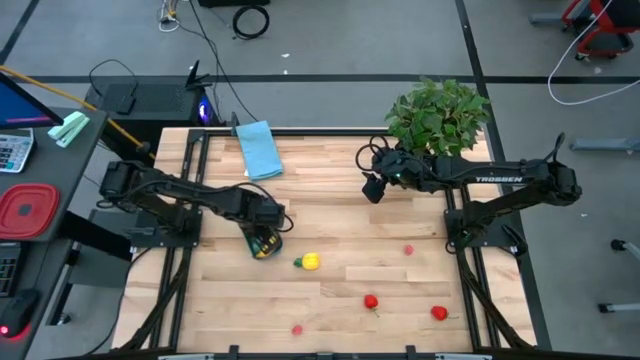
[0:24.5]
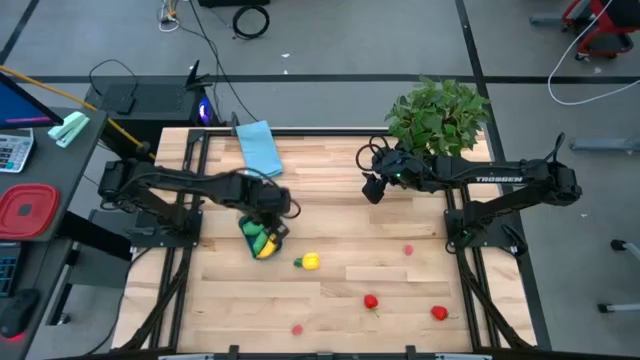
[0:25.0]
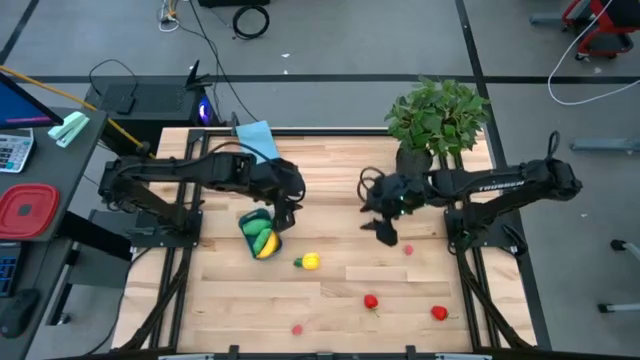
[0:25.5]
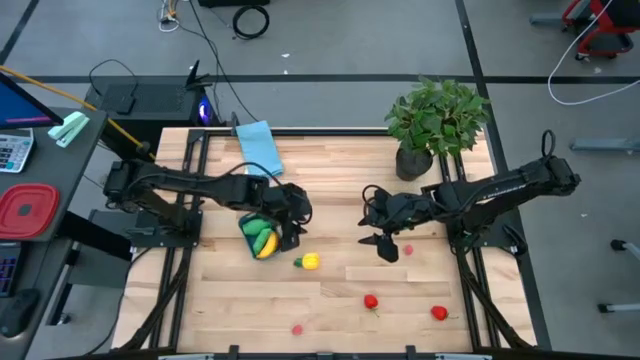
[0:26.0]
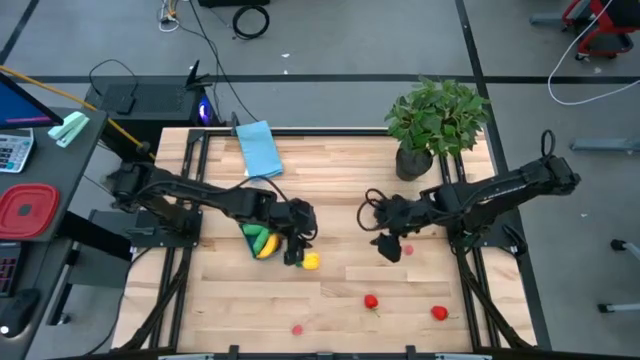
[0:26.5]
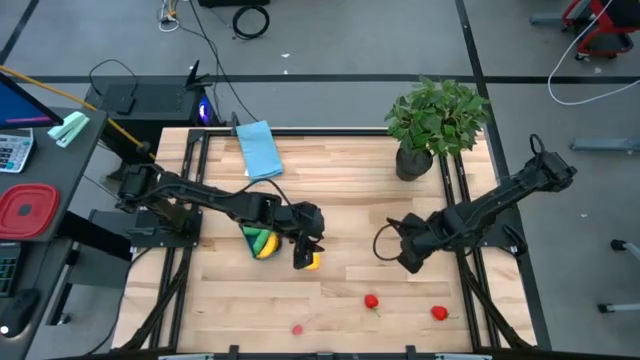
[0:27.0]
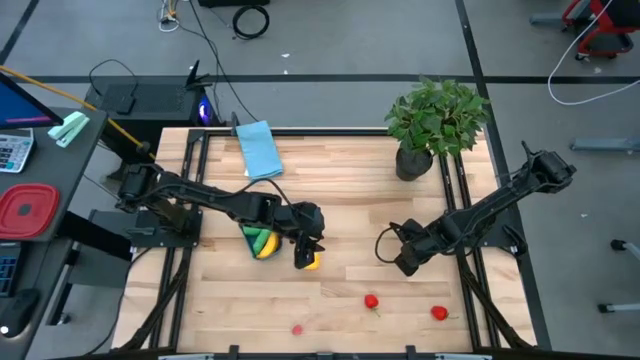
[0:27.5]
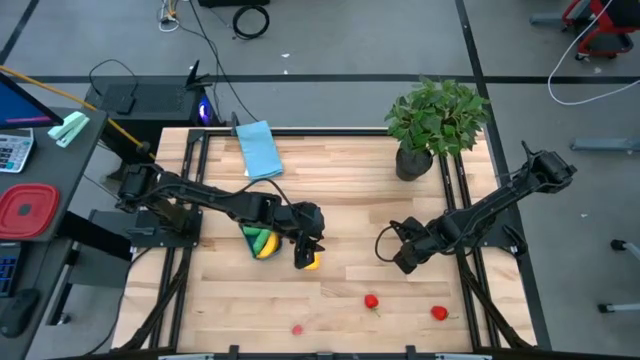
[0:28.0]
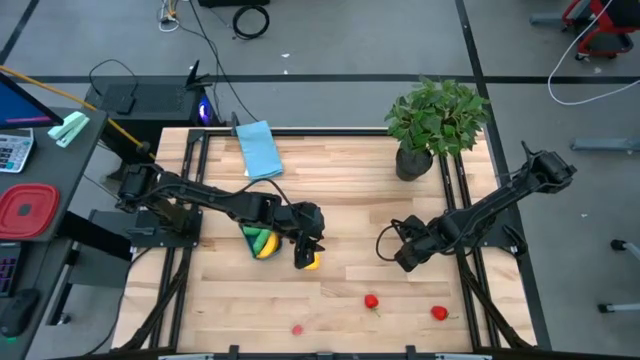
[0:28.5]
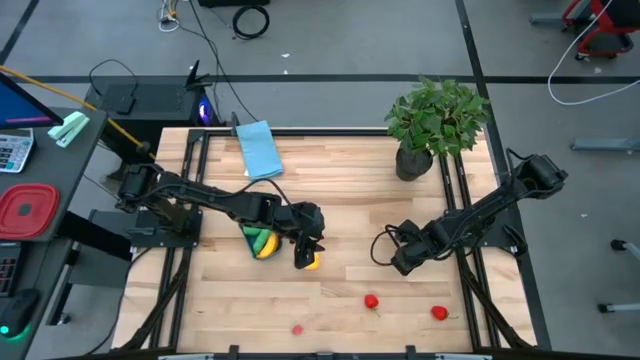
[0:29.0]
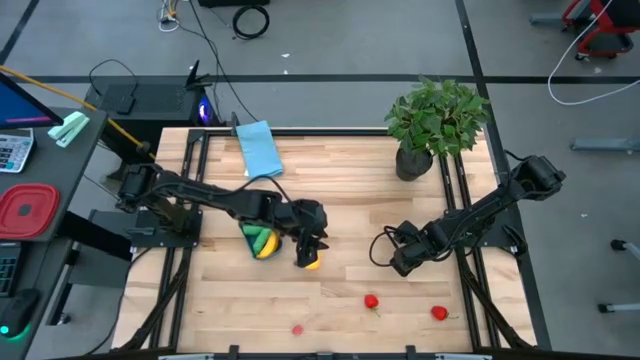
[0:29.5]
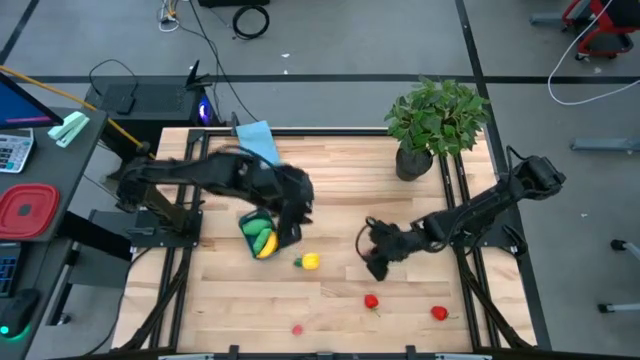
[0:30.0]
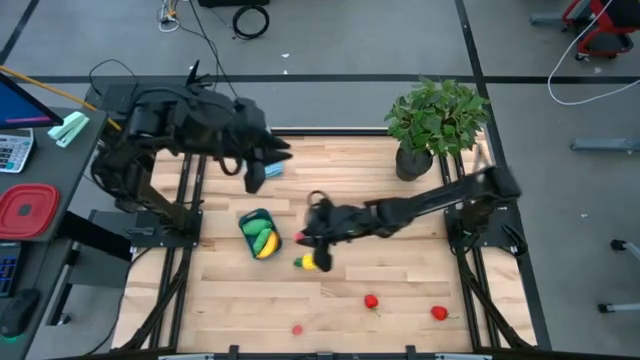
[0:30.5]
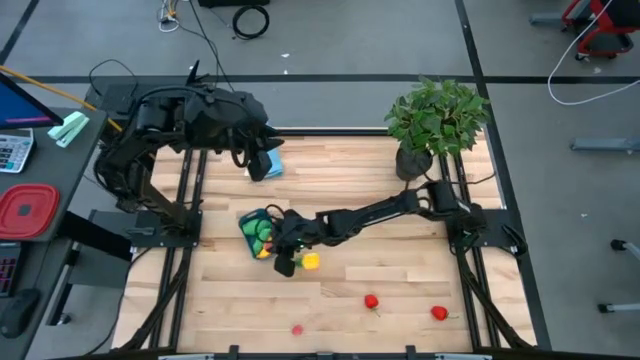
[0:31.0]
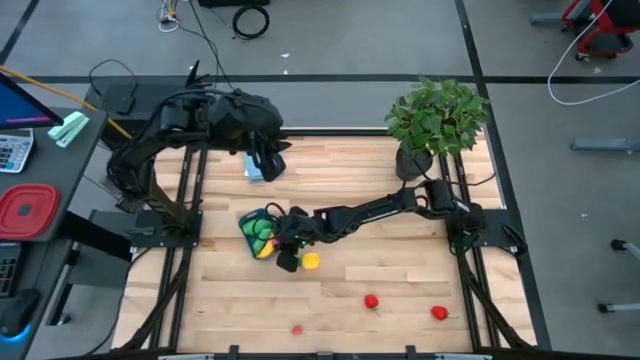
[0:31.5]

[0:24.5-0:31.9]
Task: Pick and placing Produce into tupperware
Put the top peach into the blue bin

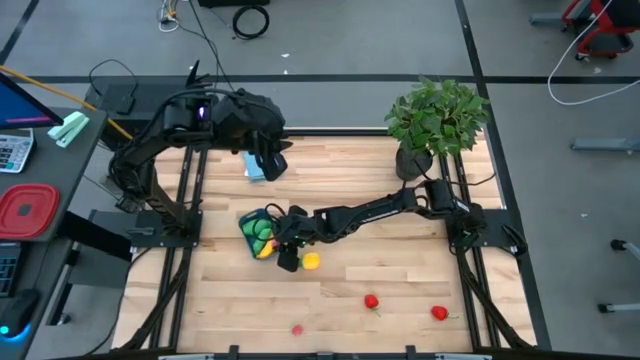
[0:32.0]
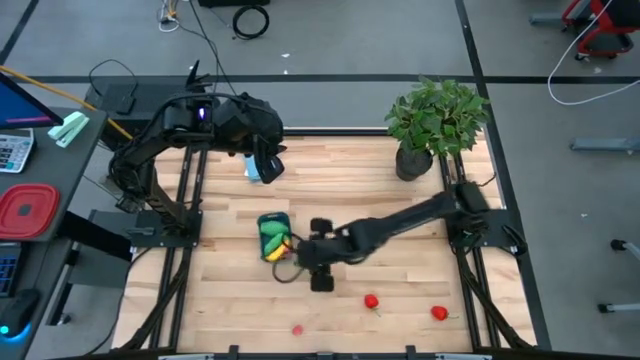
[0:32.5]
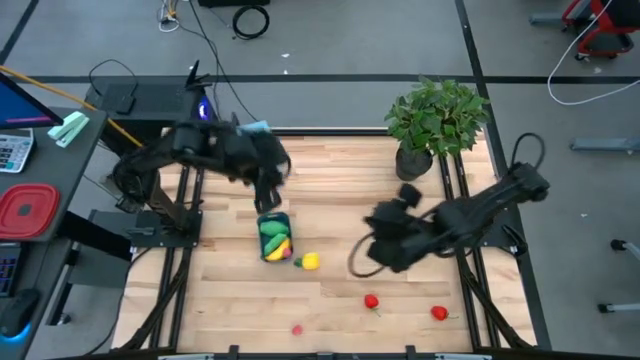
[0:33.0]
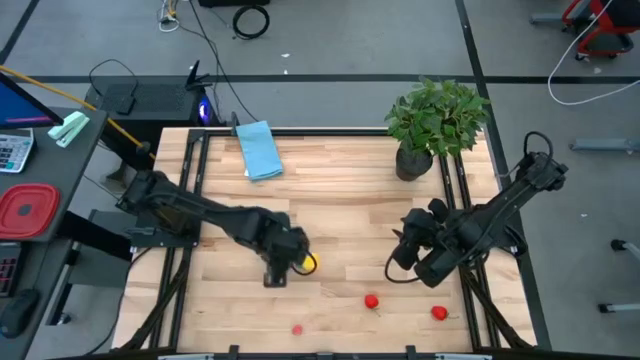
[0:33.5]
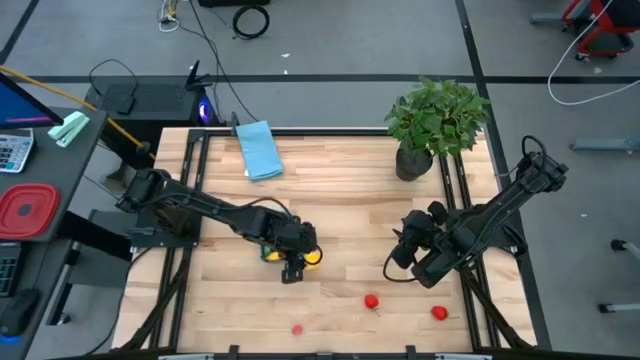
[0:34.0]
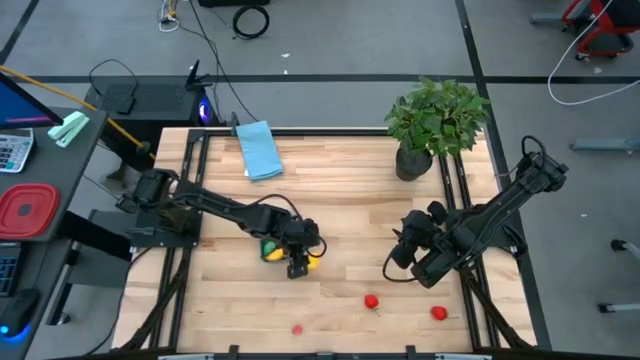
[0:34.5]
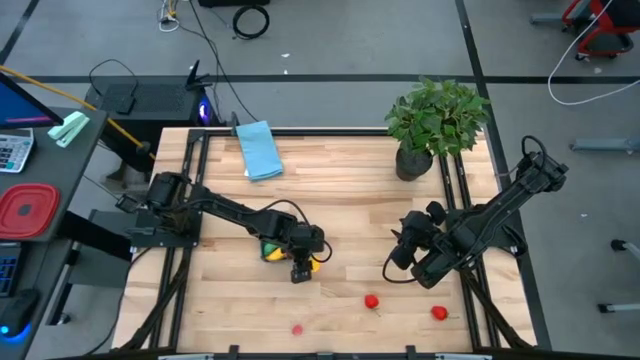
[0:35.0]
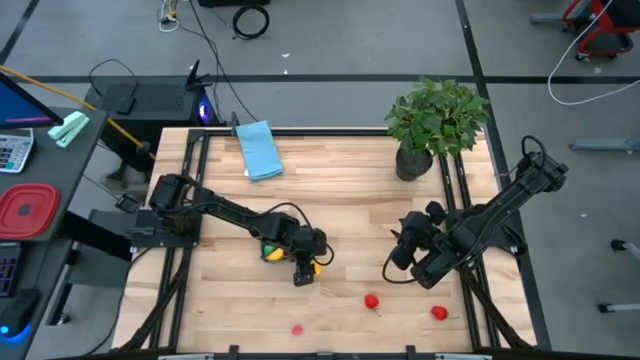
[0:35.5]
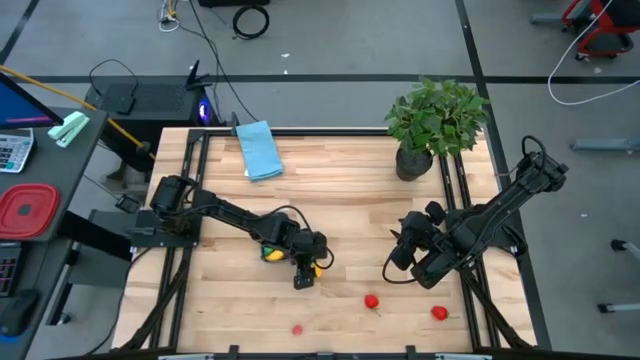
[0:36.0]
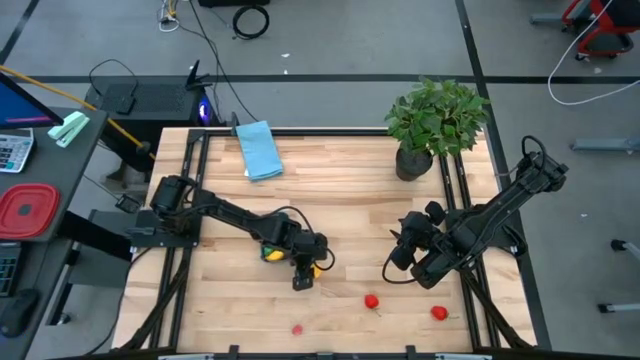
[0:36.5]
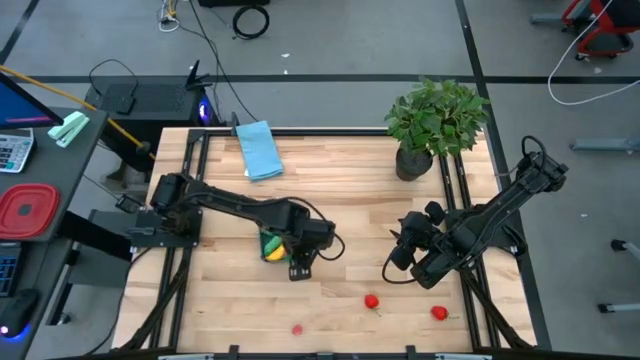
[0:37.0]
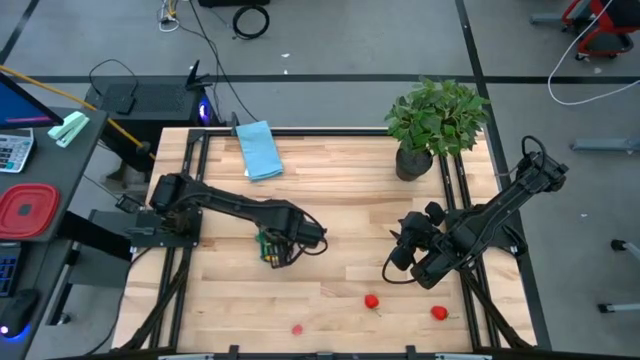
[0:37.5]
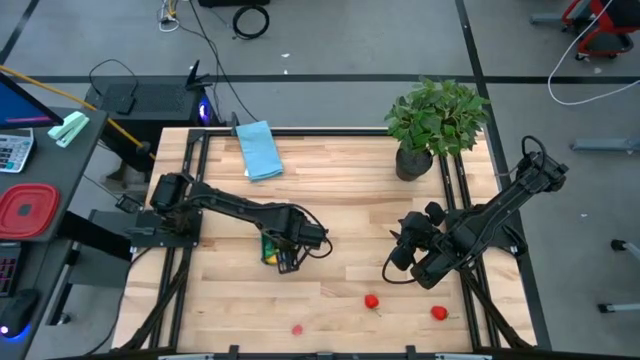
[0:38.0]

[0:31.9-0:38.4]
Put the pineapple into the blue bin

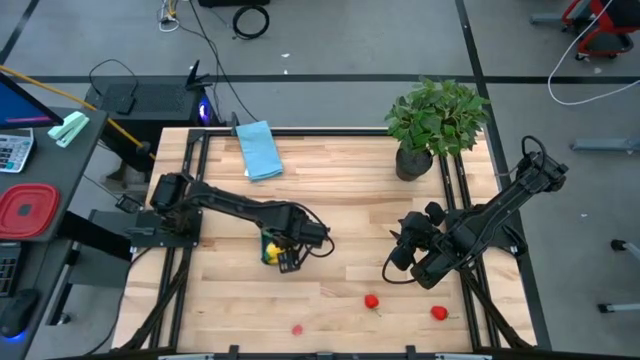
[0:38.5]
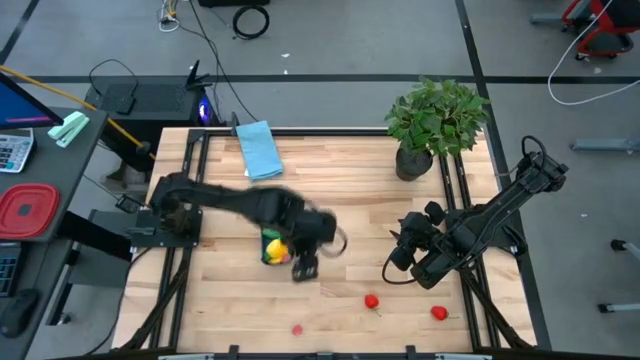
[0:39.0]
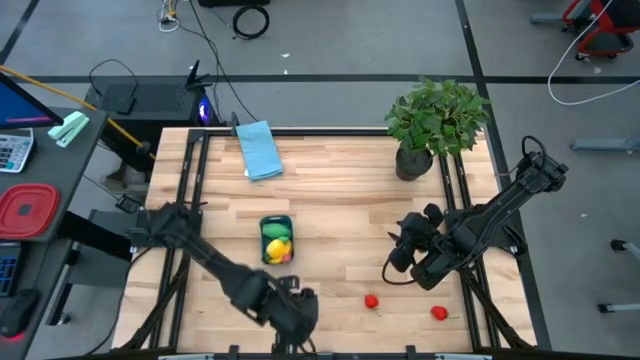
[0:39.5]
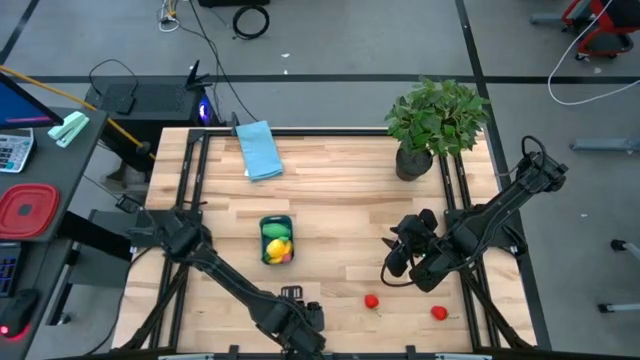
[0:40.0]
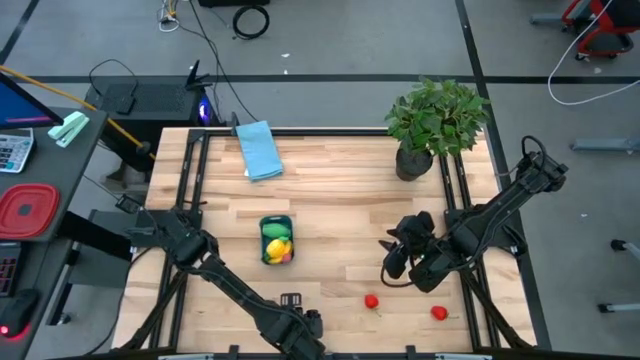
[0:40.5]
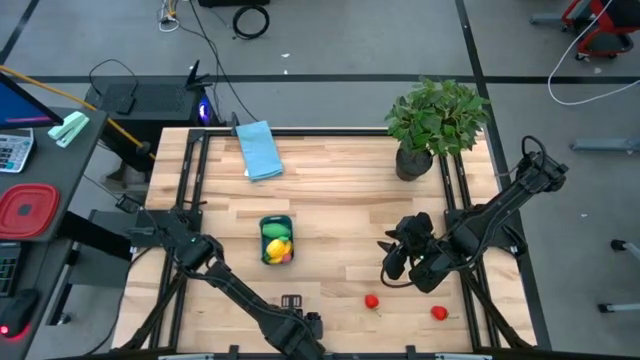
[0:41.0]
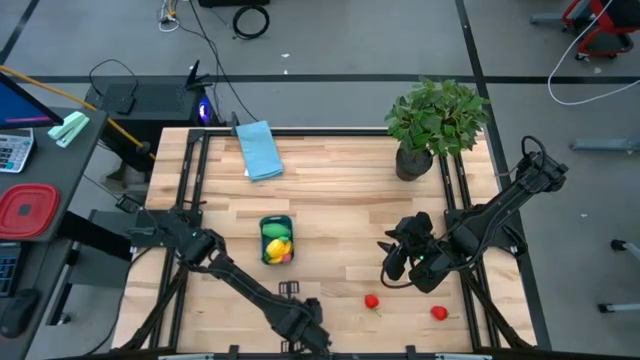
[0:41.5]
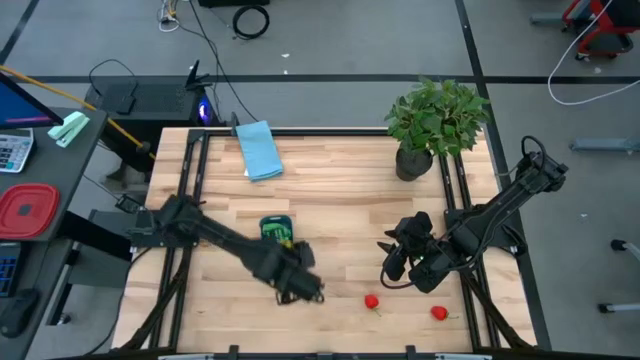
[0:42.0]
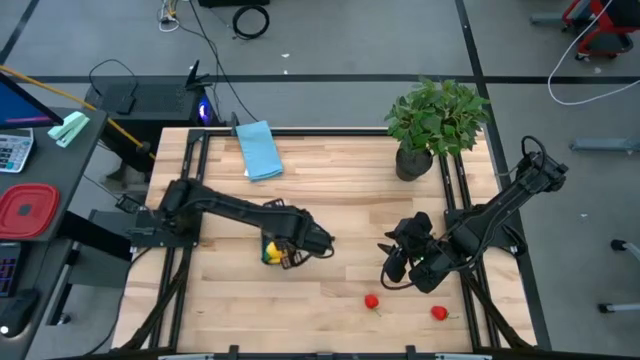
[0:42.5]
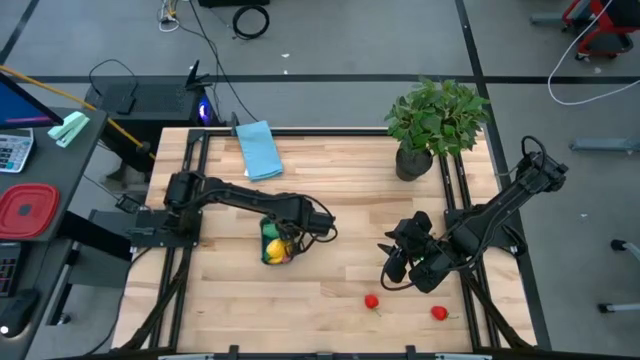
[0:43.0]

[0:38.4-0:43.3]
Put the peach into the blue bin

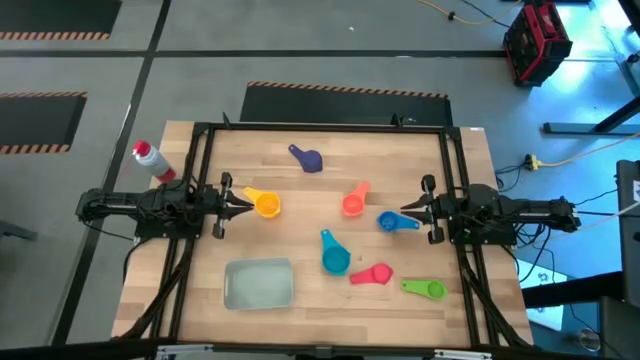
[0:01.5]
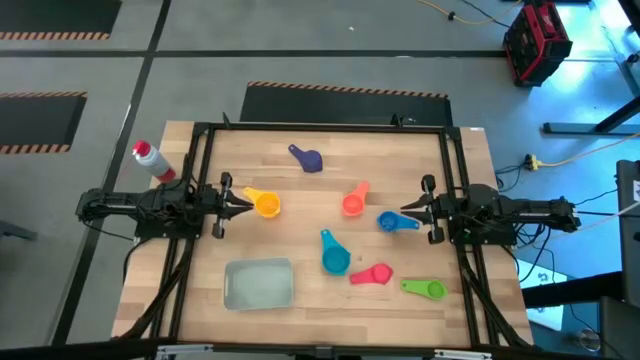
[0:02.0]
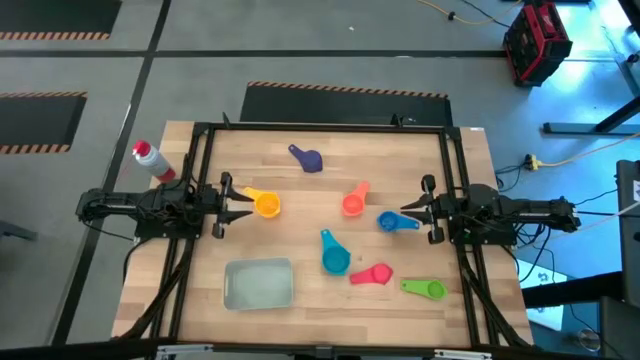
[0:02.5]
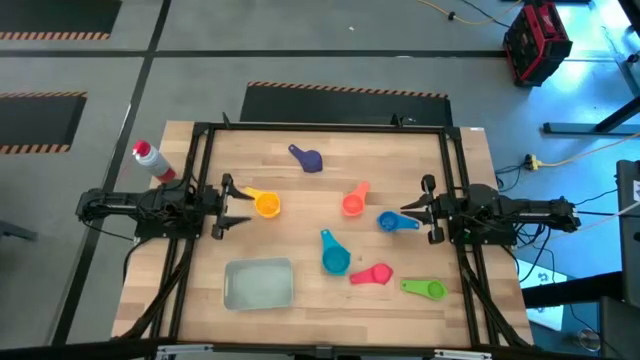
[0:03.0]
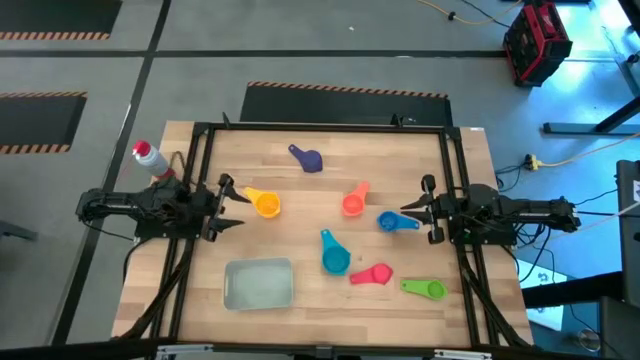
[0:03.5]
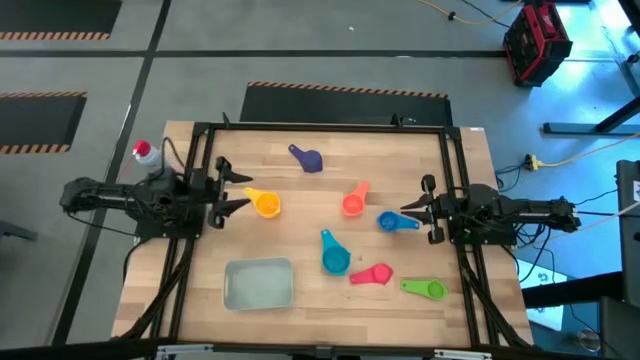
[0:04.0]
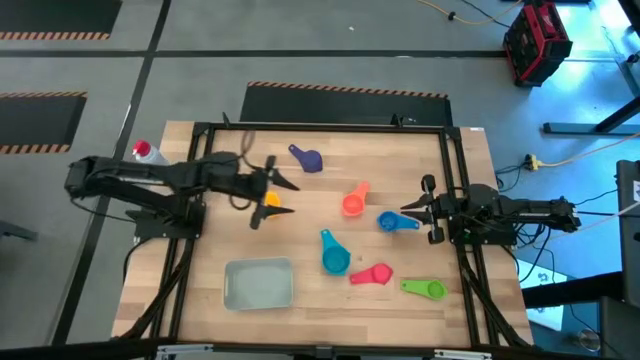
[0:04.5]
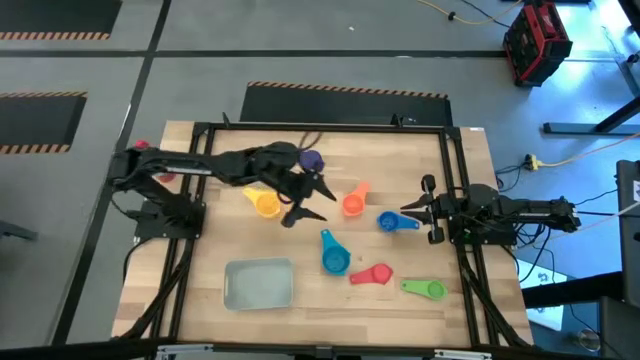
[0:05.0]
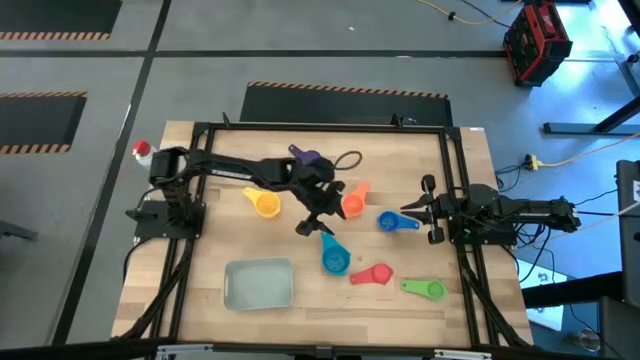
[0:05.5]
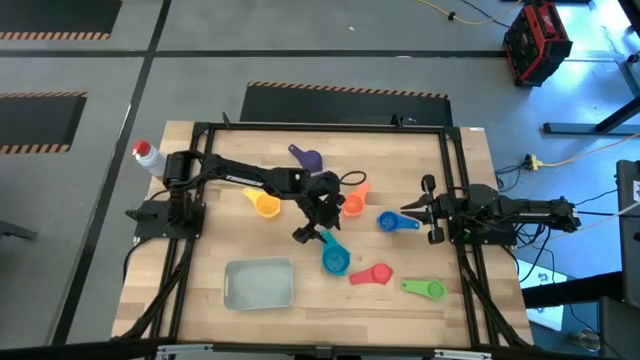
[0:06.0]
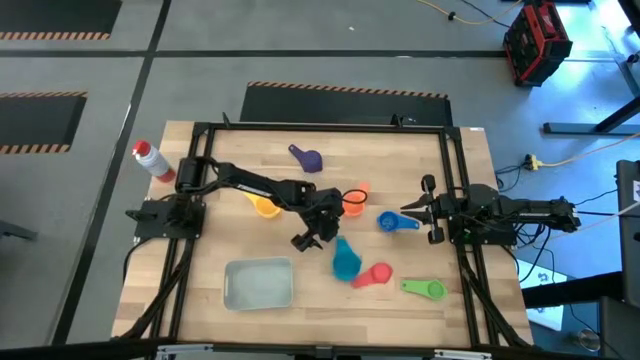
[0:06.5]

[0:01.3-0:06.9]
Task: Nest measuring cups in basket
Put the light blue measuring cup into the gray bin
